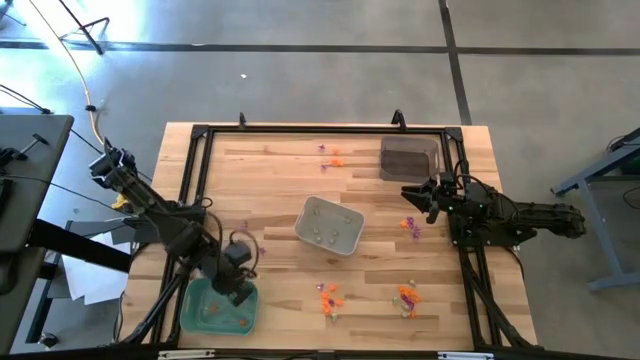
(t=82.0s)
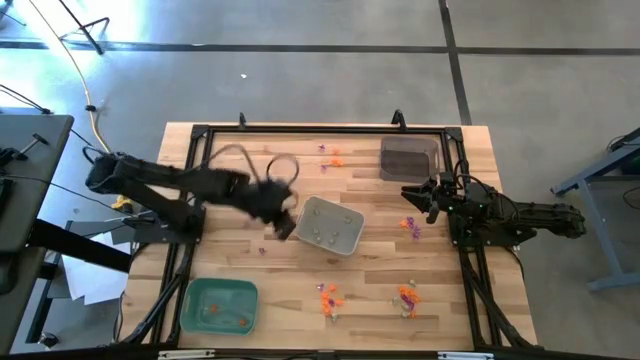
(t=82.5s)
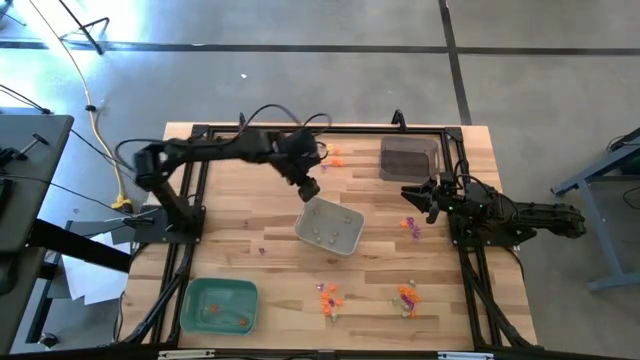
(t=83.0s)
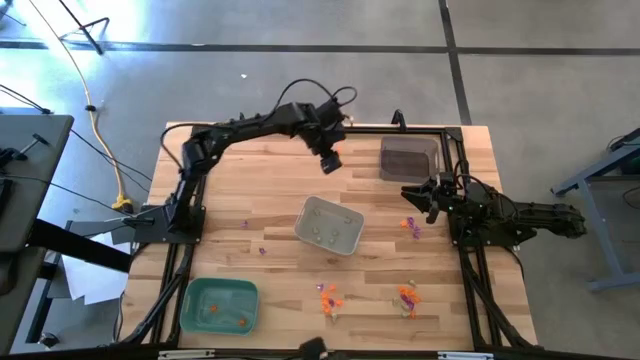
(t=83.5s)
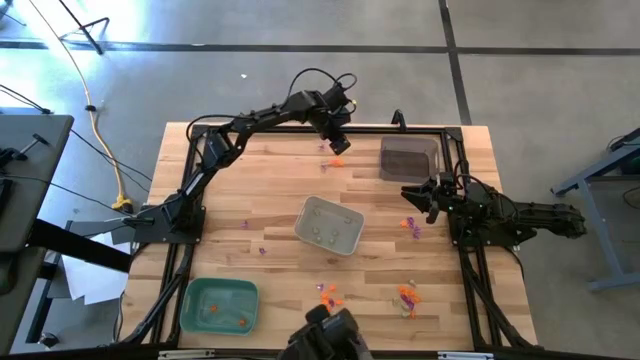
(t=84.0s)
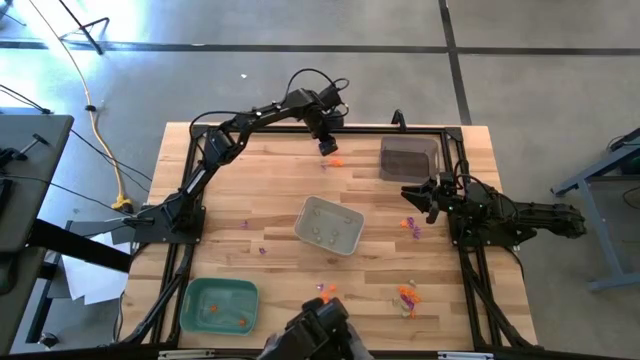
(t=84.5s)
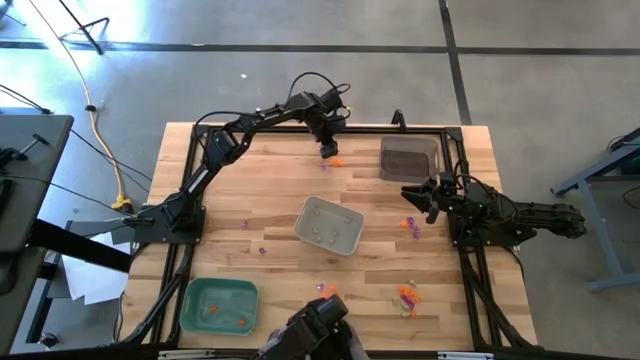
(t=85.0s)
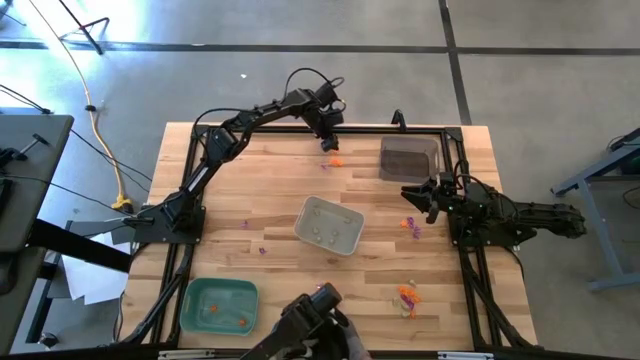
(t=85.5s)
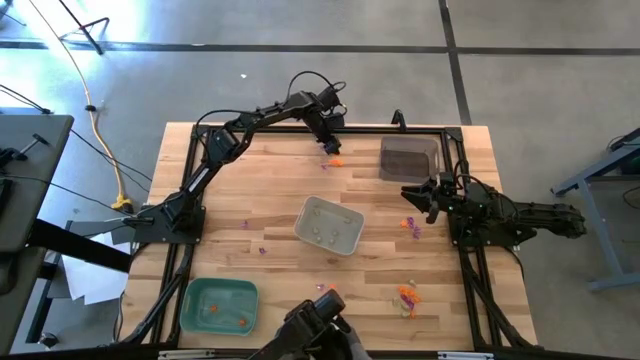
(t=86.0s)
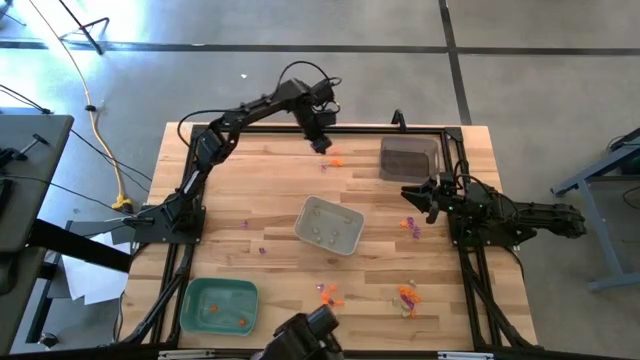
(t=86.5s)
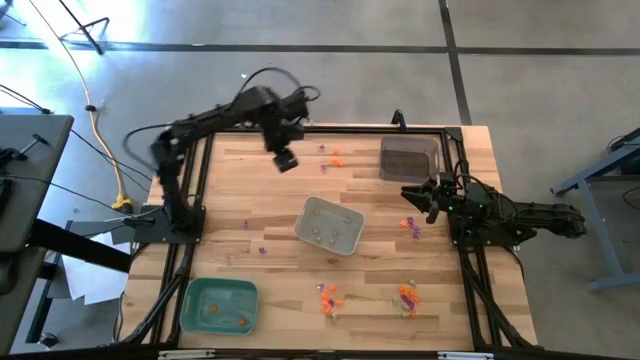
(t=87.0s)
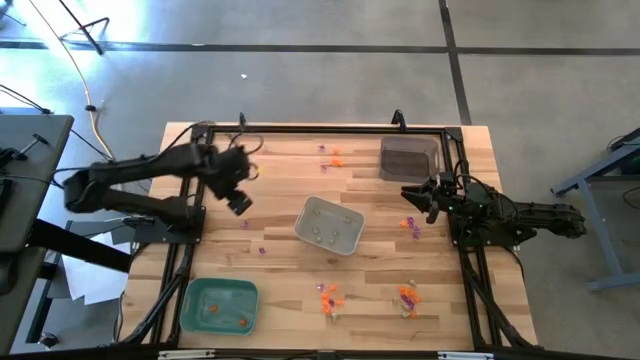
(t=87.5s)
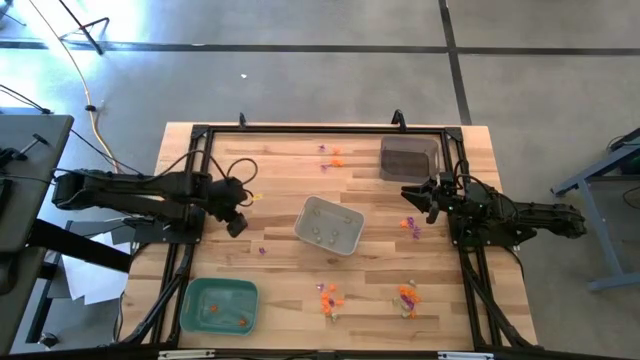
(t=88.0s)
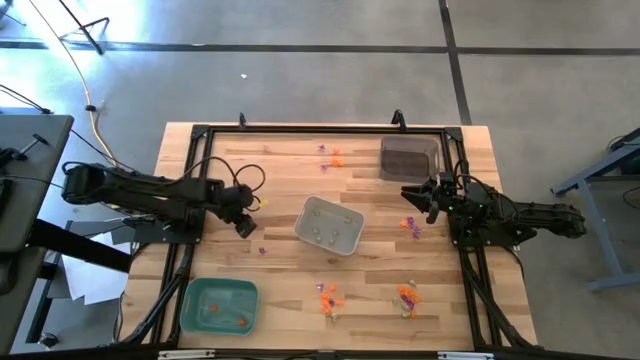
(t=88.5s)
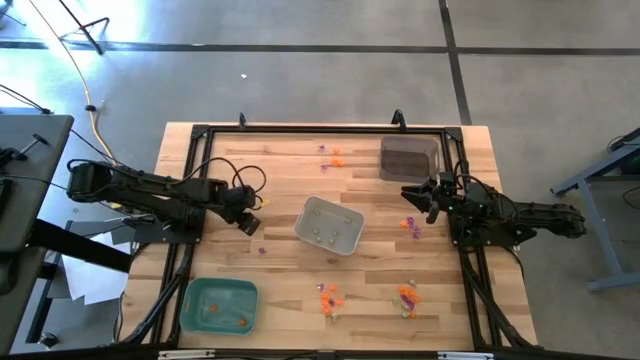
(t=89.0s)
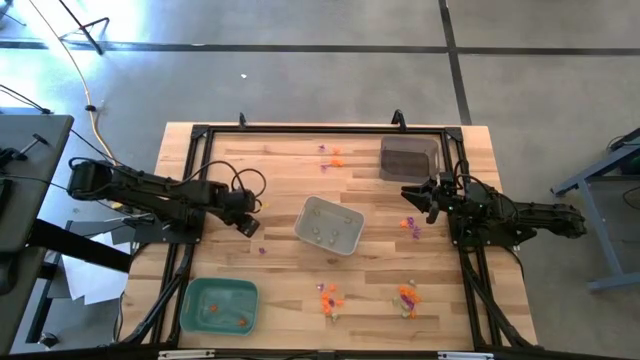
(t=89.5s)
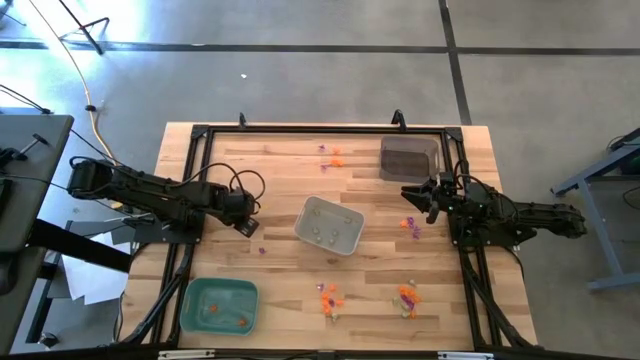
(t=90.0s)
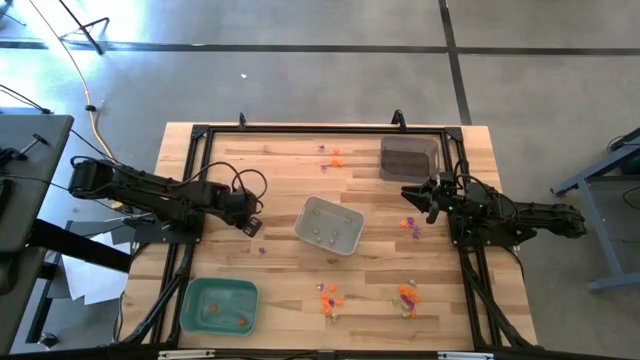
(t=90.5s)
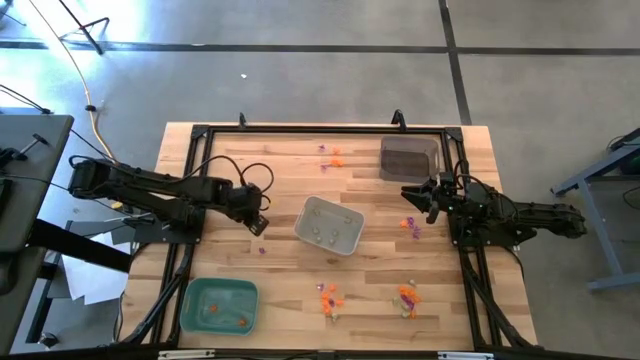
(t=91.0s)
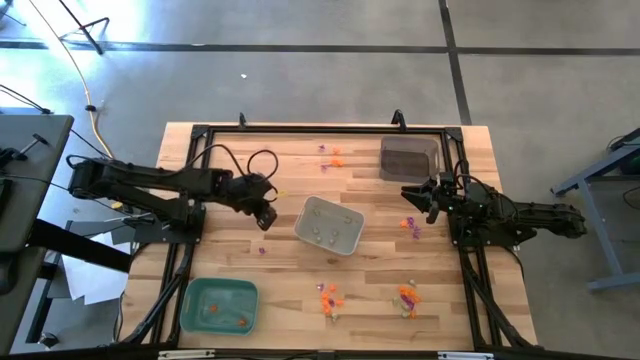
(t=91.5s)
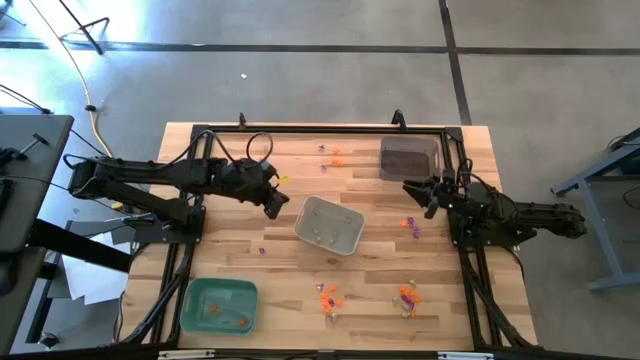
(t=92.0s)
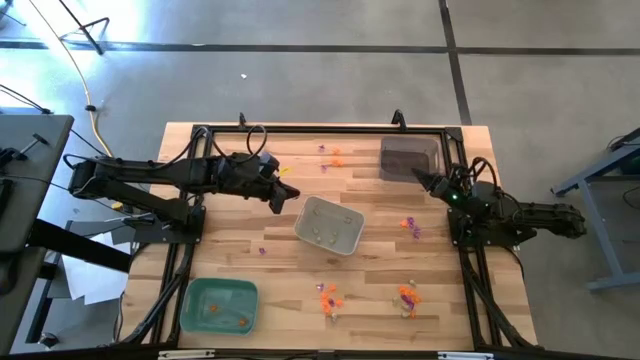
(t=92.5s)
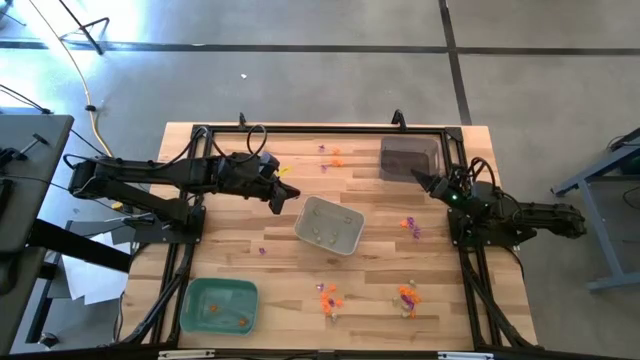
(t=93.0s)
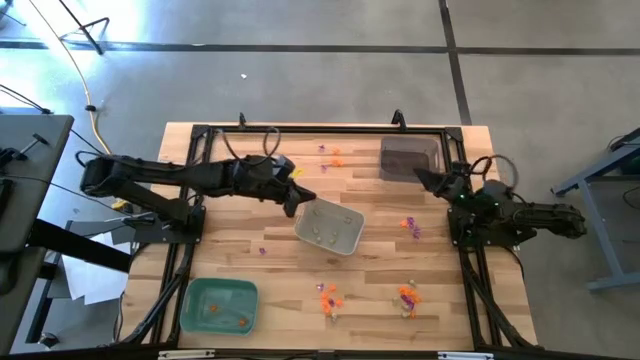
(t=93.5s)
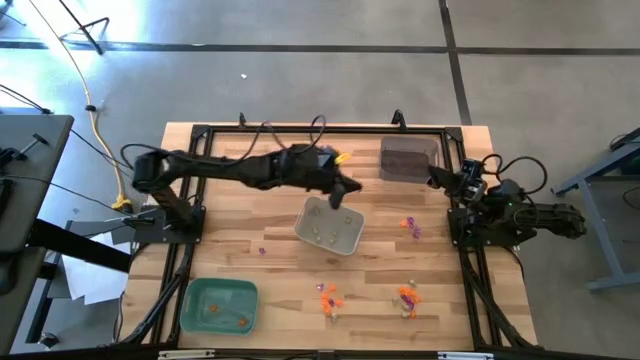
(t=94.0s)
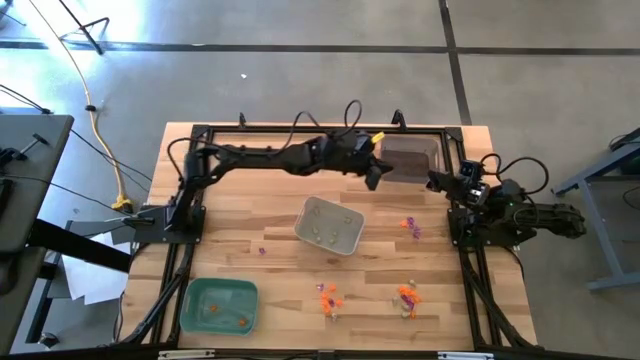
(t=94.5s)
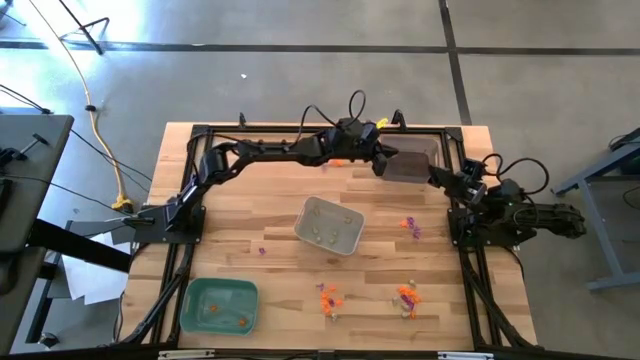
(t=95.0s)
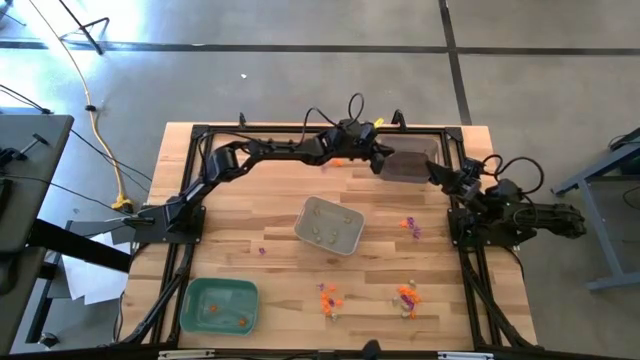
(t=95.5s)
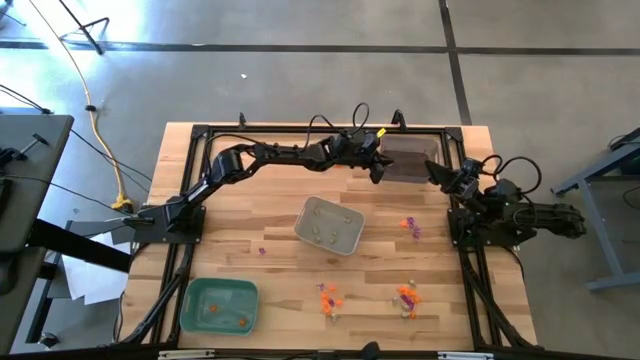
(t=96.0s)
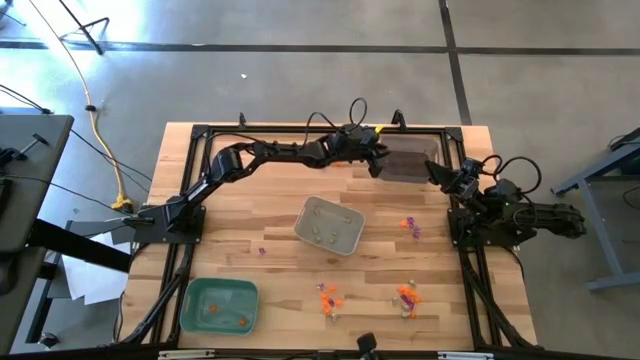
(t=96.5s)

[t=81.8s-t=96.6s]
Task: Sort Halloween decoration
Put the violet witch hat toy into the black bin

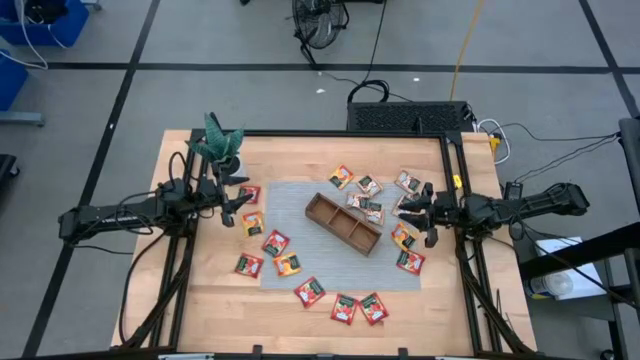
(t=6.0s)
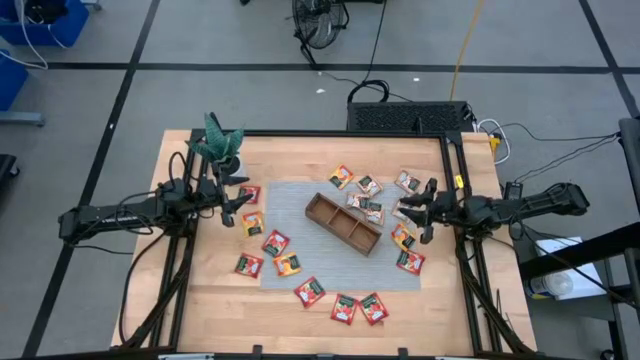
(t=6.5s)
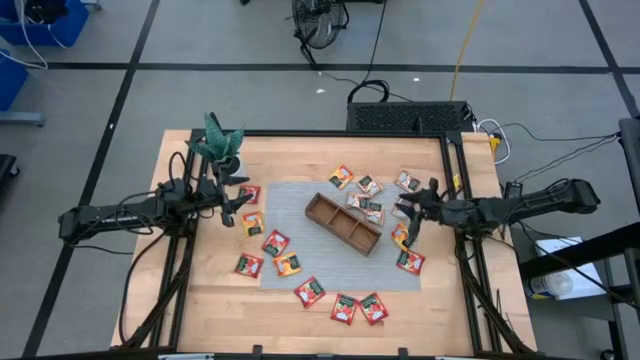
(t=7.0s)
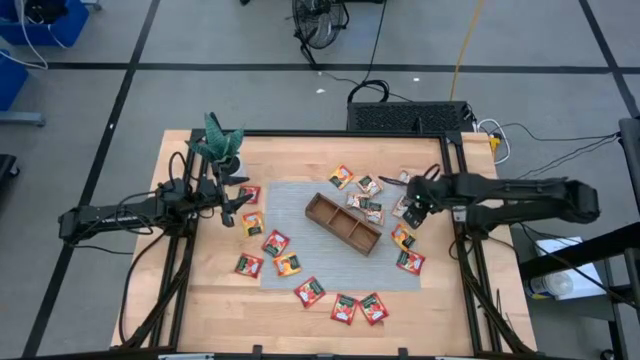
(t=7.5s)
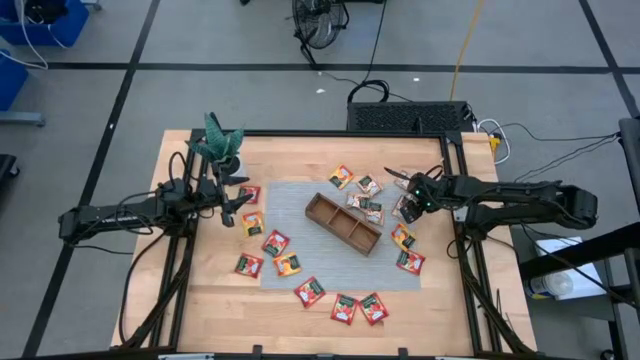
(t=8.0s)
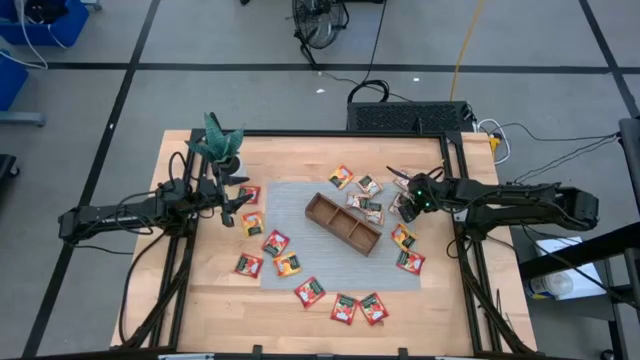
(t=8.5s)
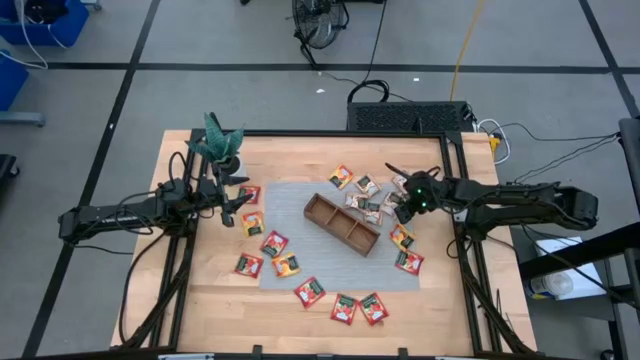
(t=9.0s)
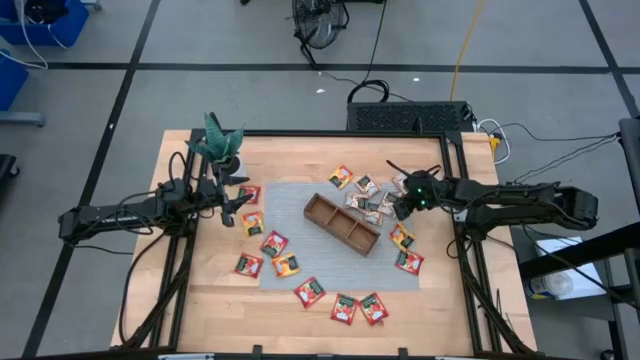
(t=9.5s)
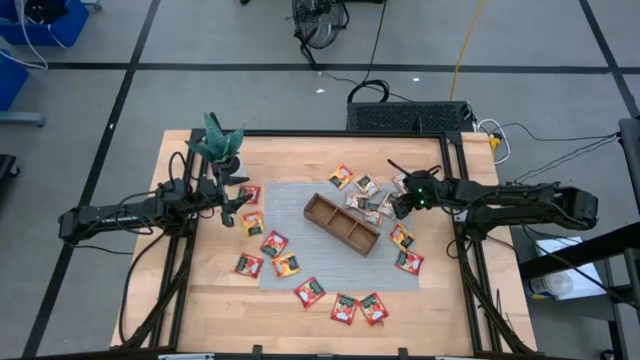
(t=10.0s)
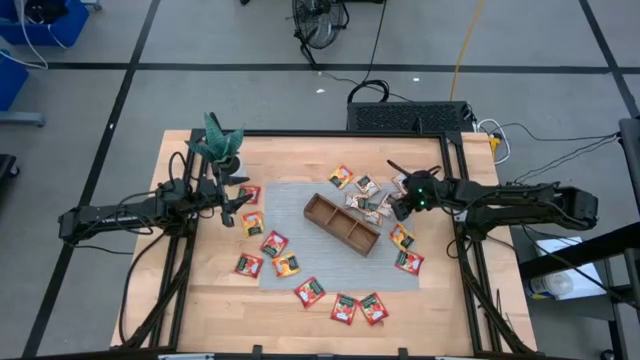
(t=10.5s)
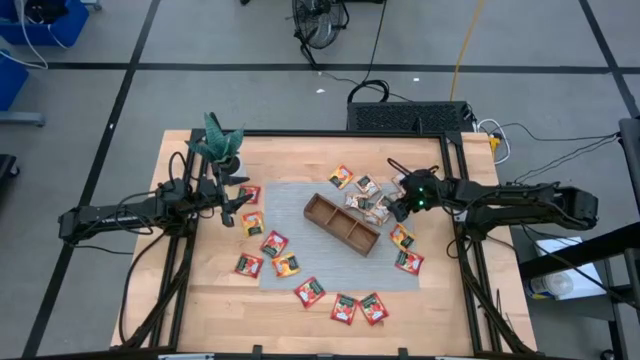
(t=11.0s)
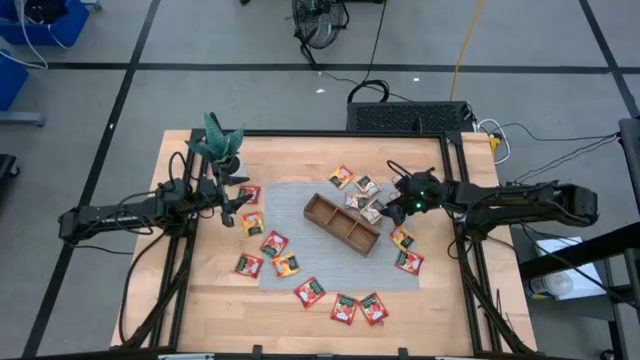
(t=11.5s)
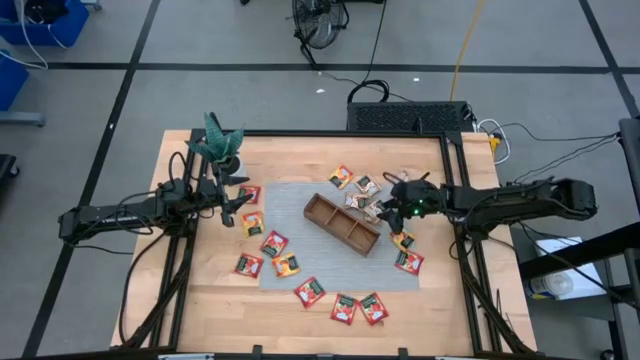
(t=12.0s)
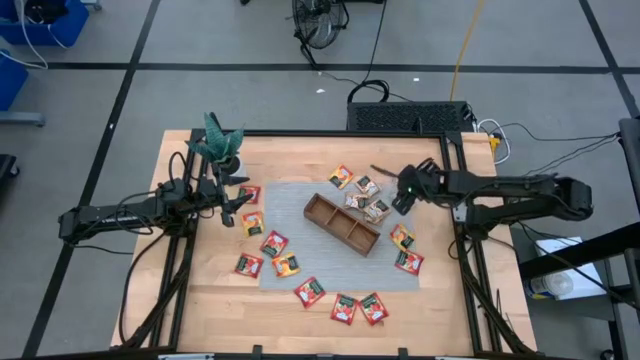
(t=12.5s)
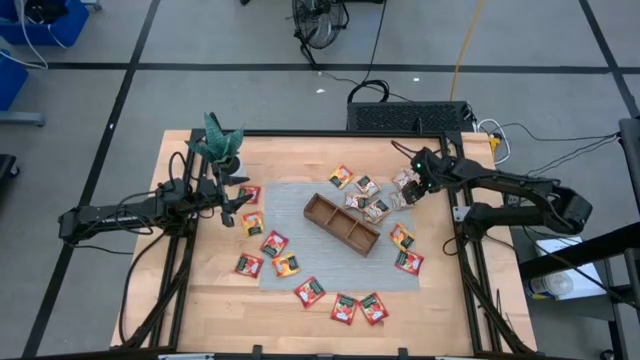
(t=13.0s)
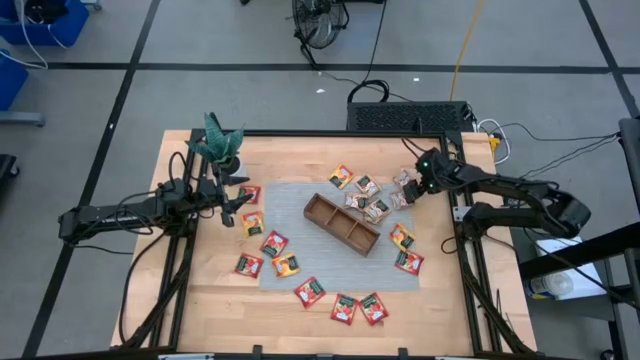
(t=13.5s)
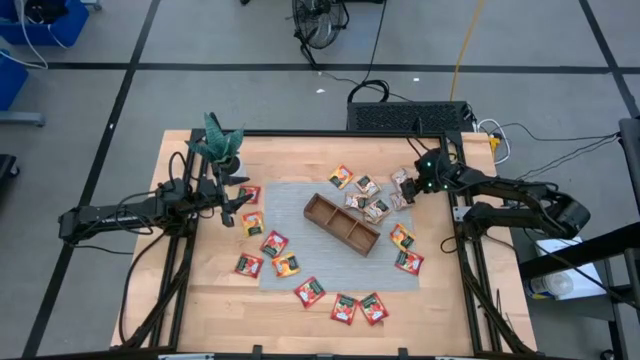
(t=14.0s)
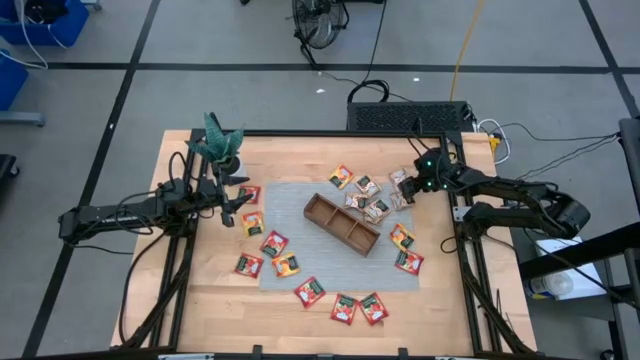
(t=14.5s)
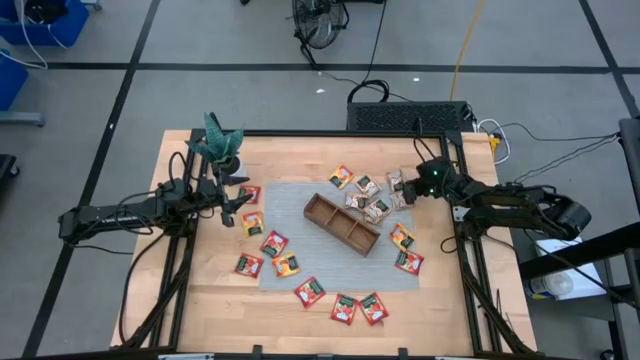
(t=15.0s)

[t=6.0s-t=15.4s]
Task: Pick & Place Tea
Put the brown tea into the right part of the wooden organizer
